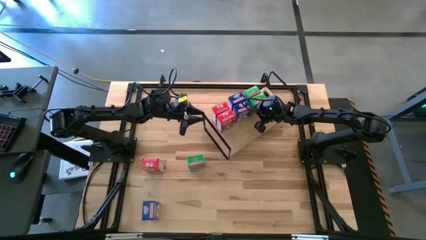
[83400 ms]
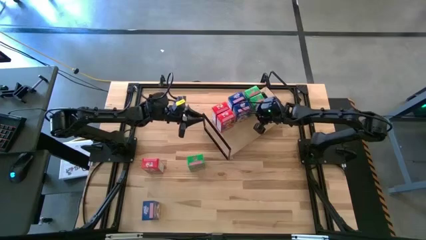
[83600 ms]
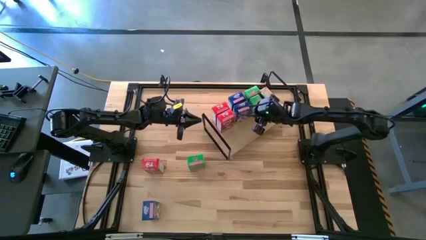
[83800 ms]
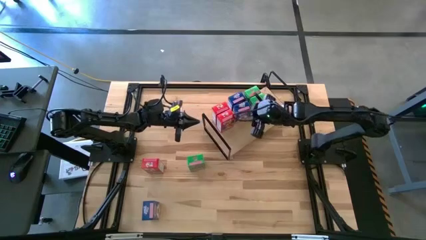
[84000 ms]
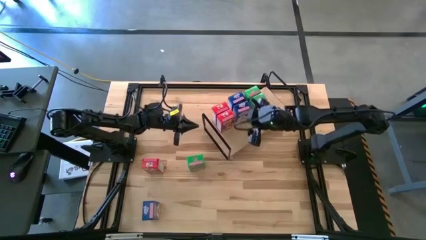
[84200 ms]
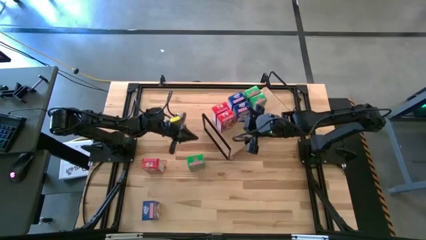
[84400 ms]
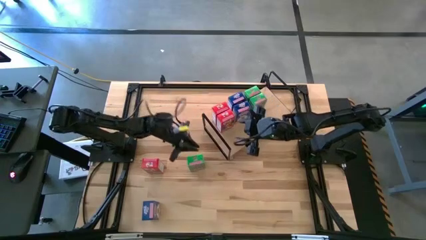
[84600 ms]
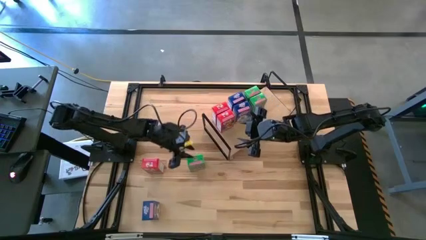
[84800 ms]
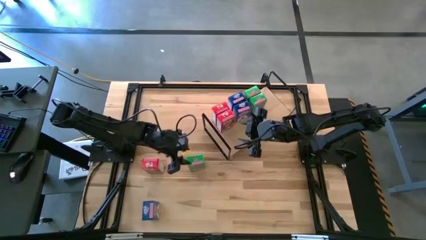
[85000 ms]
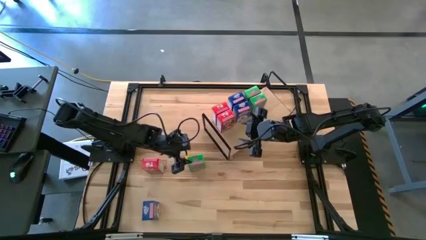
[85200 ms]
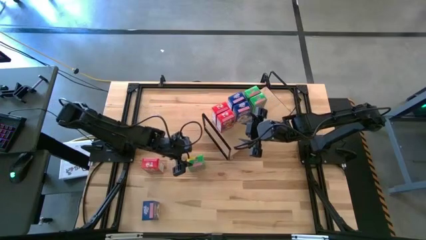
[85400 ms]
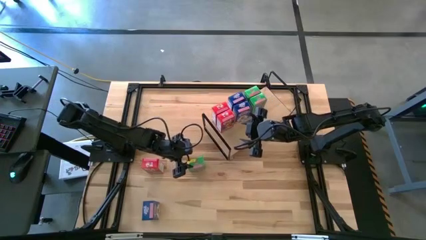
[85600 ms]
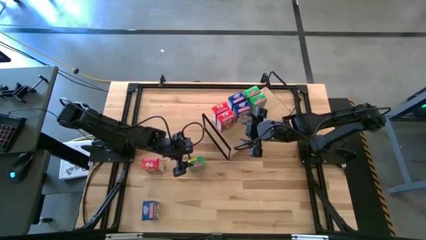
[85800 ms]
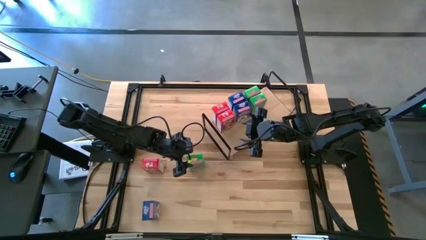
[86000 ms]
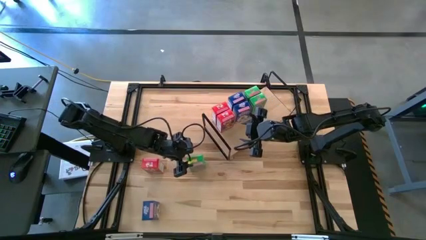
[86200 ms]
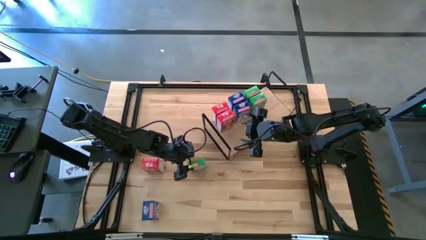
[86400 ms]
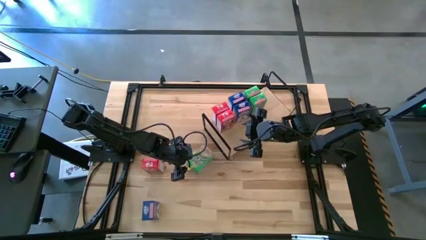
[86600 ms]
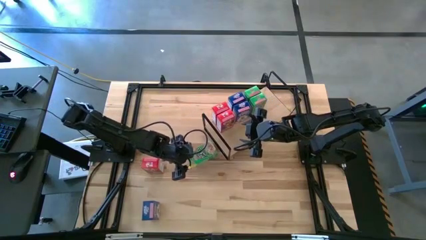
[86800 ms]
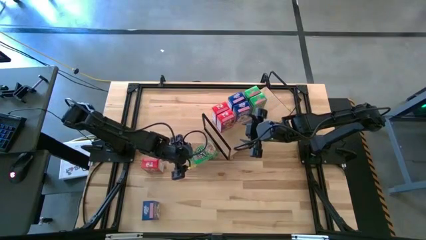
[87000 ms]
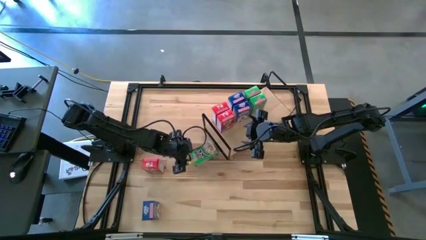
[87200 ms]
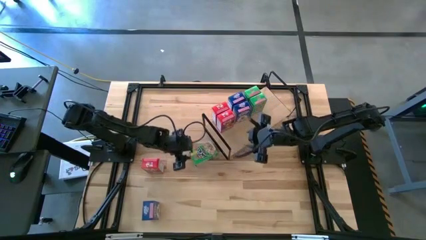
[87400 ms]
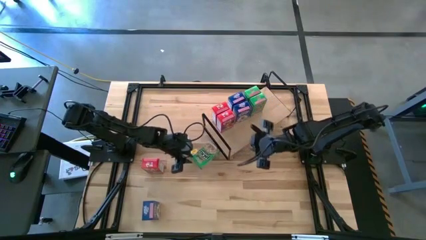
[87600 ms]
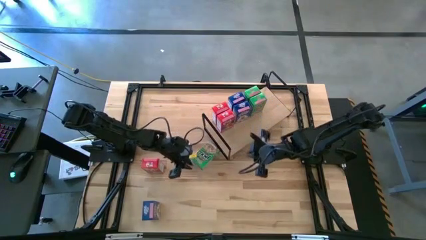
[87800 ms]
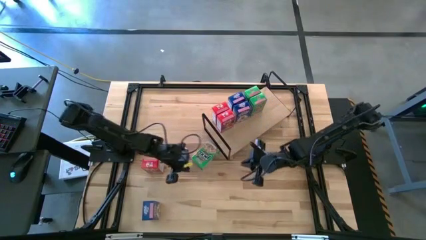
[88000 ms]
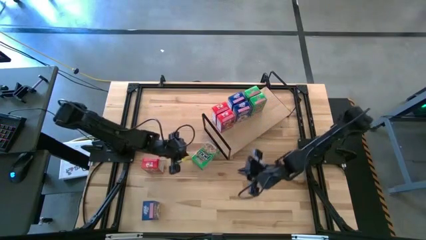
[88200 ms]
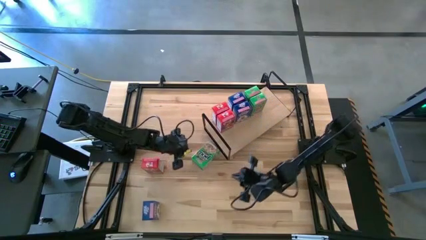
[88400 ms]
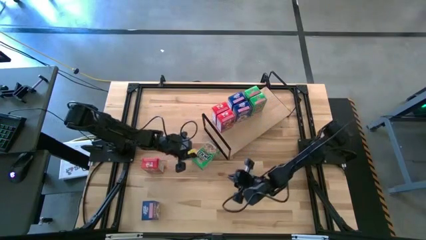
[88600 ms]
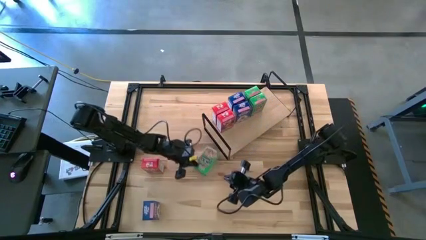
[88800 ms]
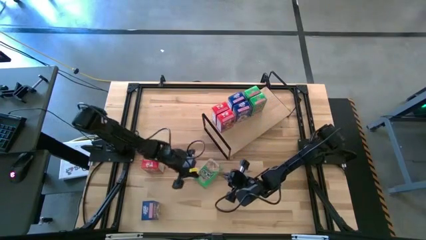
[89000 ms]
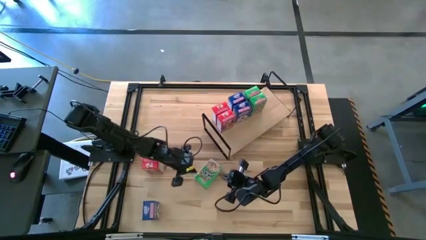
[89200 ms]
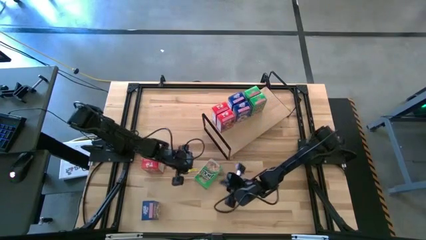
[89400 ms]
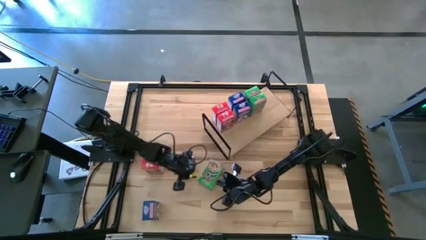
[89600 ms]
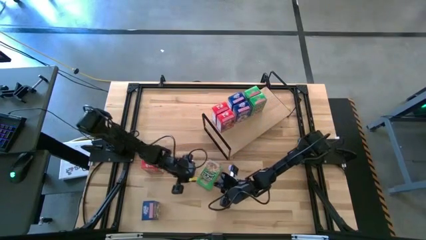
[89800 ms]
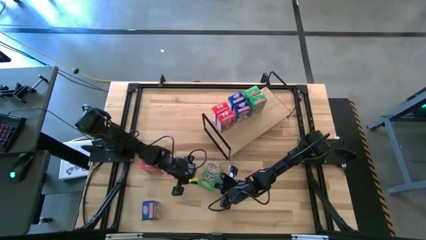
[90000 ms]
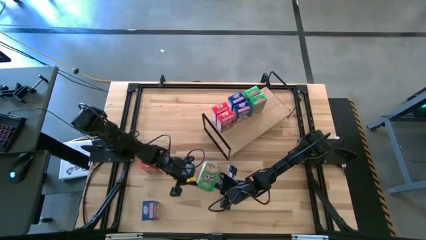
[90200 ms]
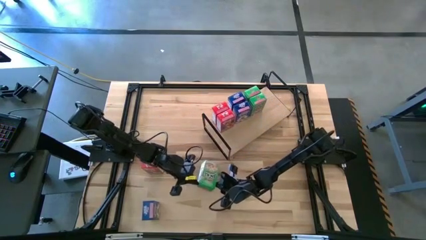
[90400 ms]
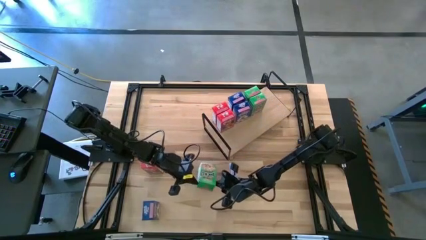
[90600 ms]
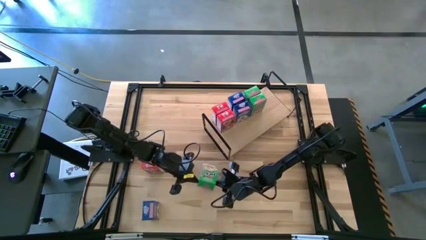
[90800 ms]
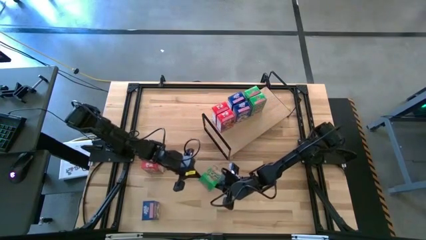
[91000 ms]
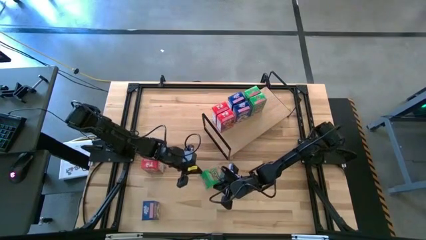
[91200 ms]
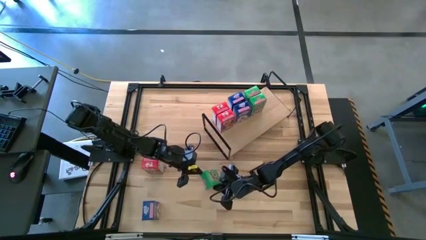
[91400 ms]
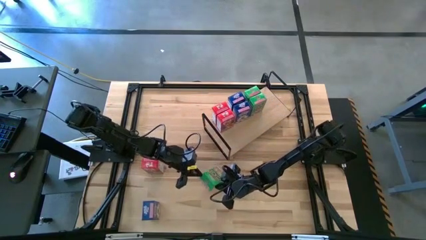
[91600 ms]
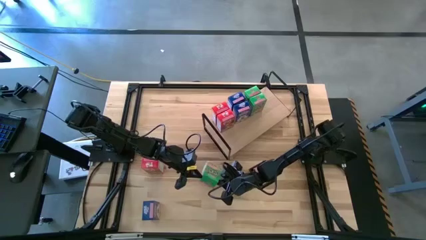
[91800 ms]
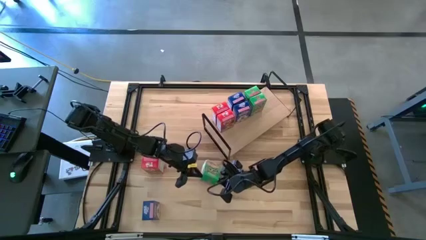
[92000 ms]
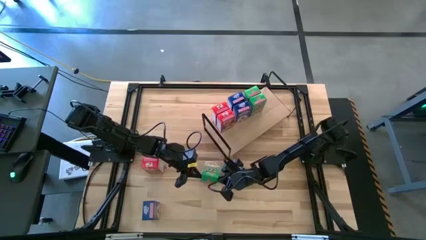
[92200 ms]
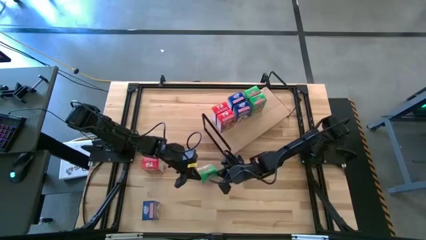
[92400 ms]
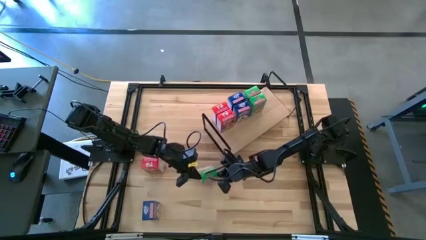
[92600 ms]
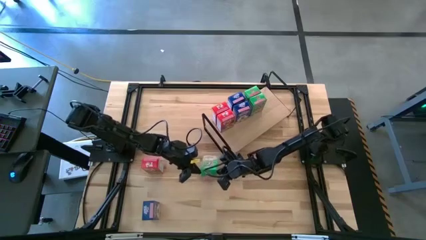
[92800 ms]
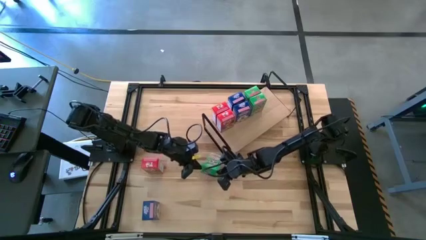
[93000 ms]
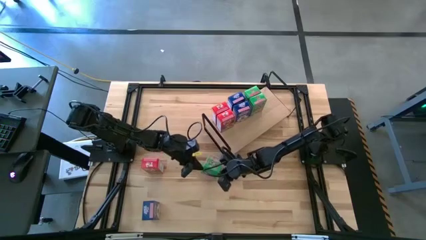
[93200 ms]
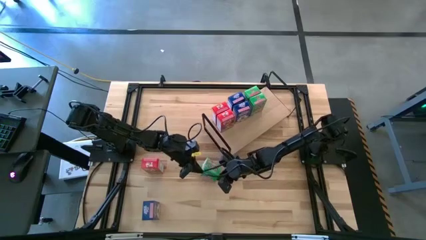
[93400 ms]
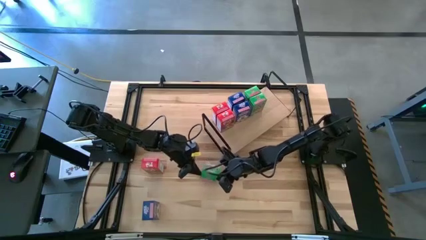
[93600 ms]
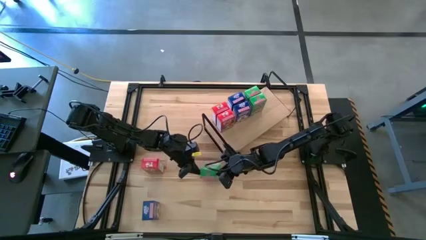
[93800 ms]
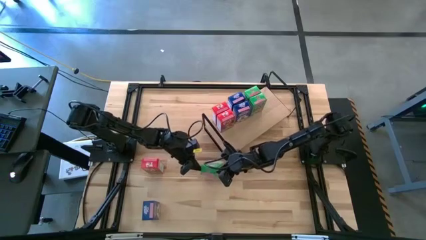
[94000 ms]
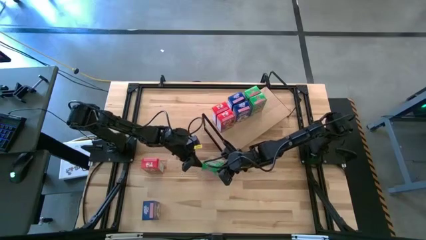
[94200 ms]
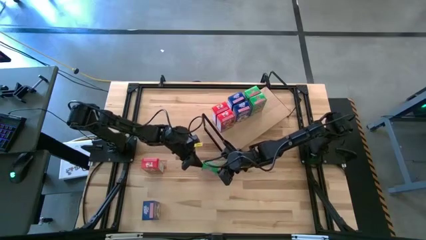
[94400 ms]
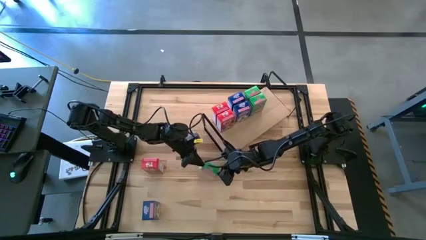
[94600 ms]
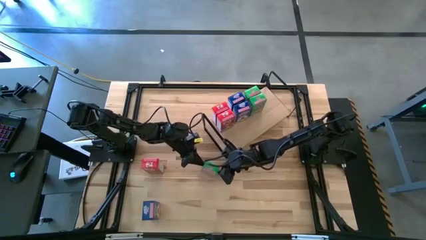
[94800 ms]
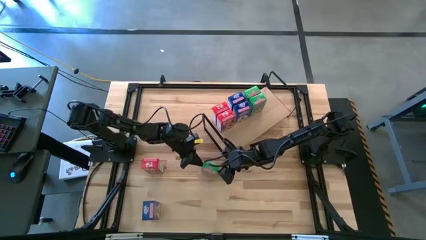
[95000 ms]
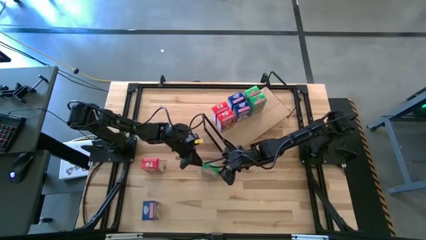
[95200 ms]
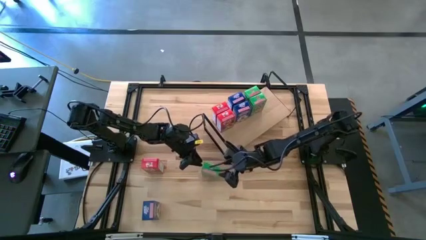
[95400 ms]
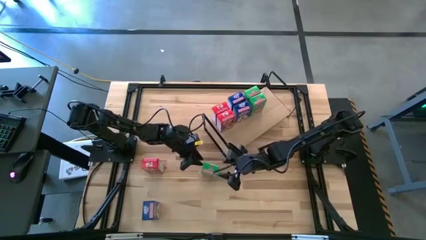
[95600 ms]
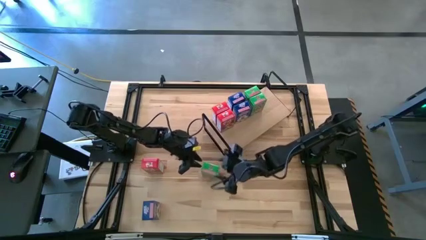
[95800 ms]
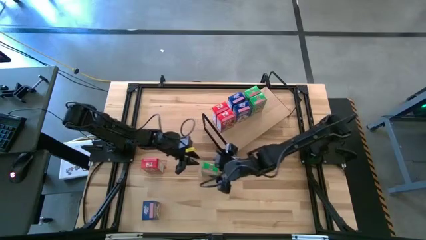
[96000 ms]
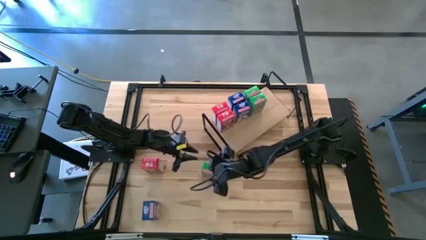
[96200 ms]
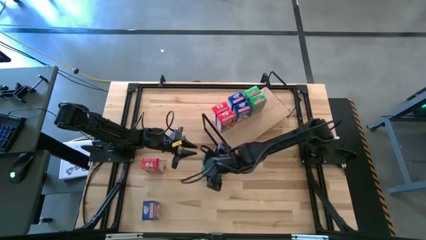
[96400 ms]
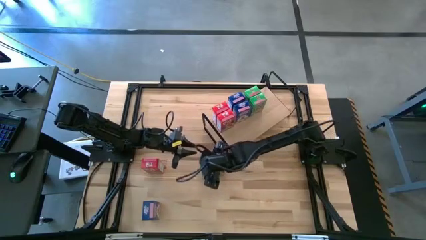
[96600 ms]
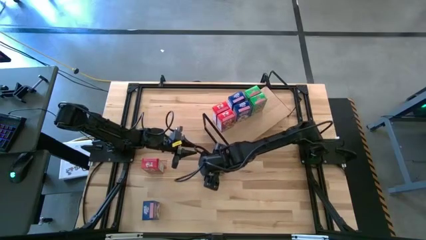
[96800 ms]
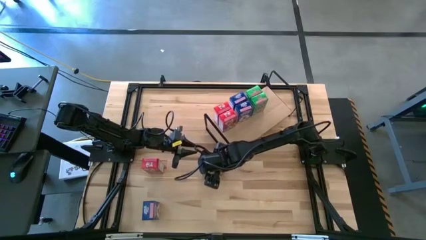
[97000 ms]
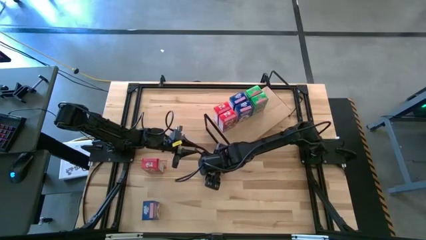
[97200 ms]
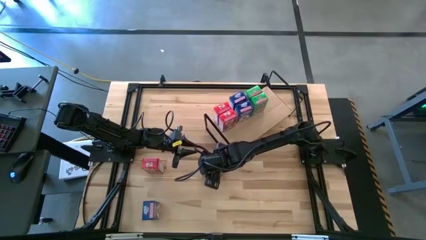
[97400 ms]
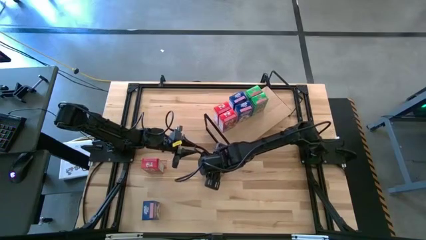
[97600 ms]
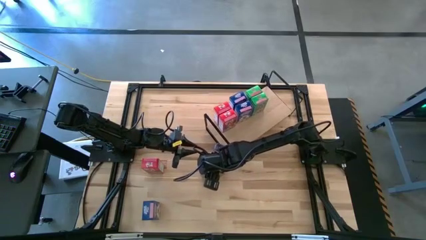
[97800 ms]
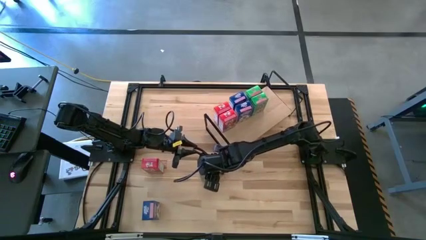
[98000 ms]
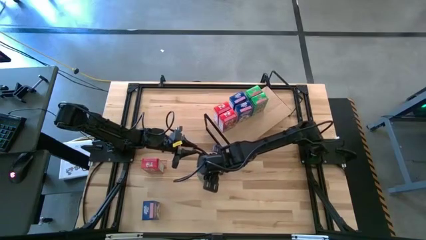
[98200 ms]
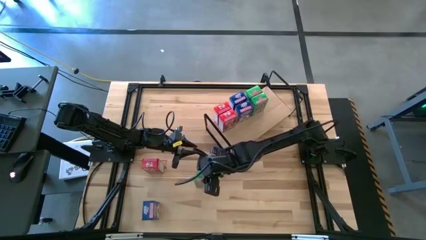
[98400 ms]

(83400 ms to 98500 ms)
Task: Stack cereal on shelf
Put the green cereal box on the shelf aligned with the other green cereal boxes

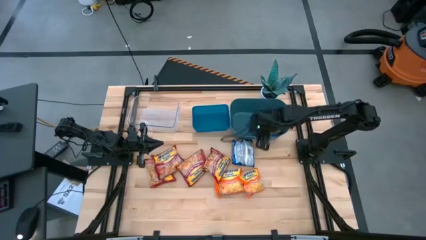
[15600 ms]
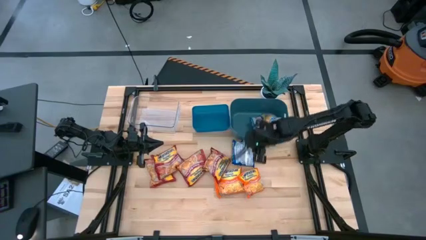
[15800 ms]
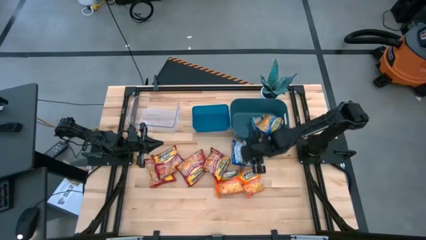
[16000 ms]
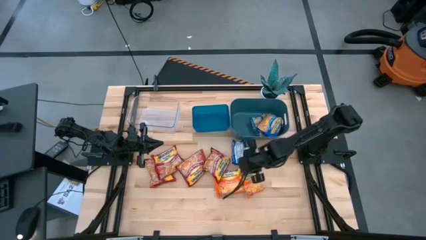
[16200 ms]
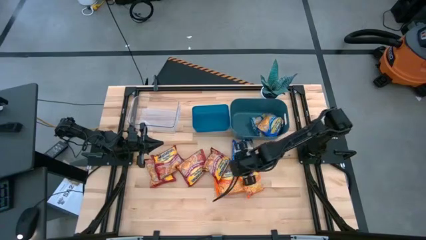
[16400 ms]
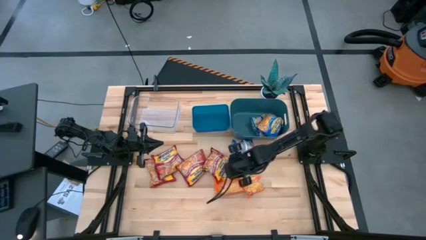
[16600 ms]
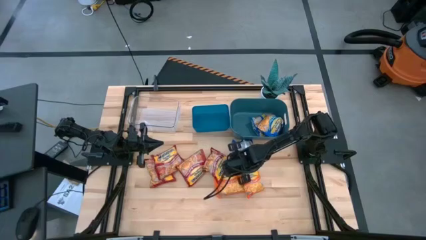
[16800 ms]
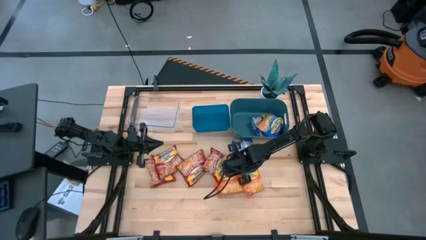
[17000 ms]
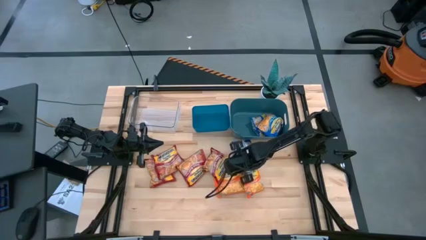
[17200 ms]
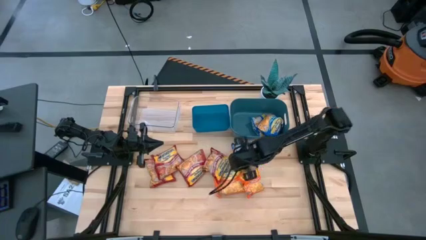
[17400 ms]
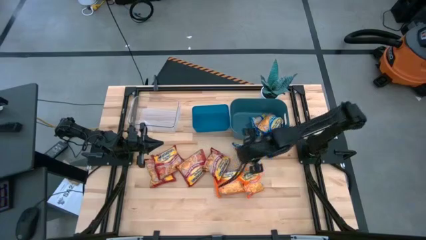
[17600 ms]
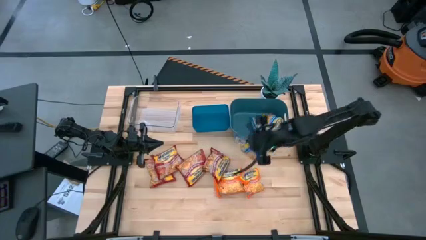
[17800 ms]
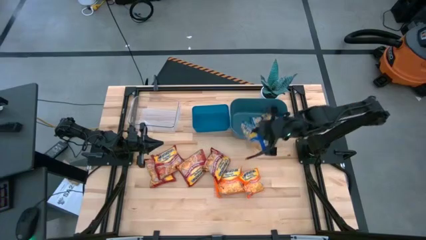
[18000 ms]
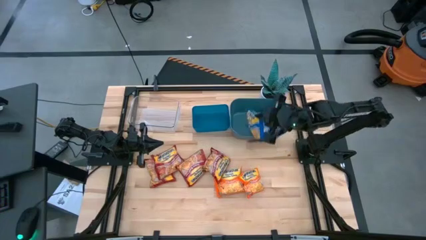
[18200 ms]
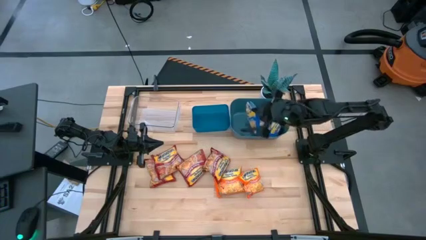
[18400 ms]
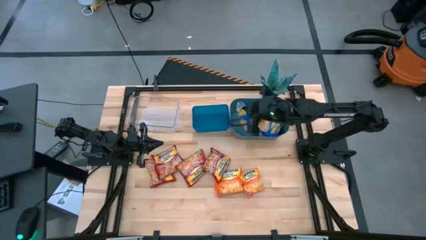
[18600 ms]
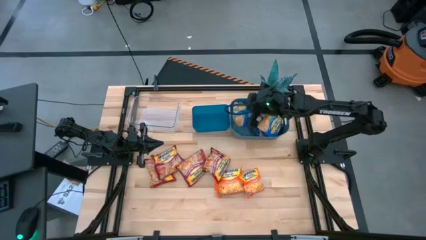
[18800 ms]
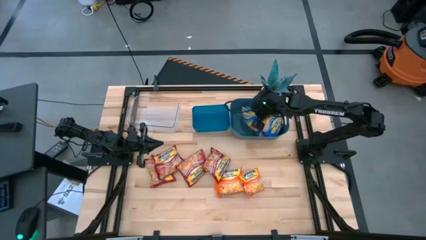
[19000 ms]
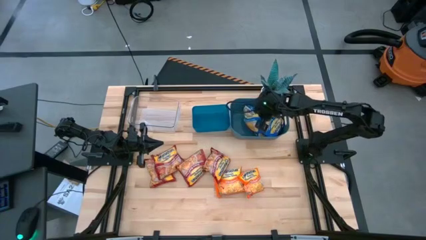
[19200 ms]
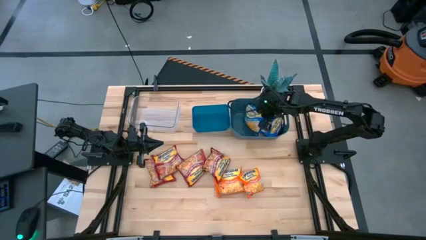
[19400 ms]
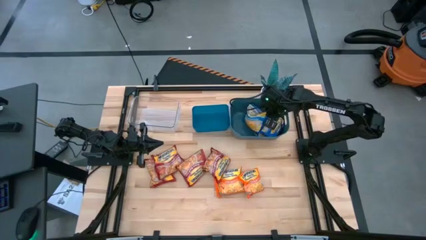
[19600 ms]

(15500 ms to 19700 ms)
Task: Sort Maruchan noodles
Put the blue noodle pack into the green bin
